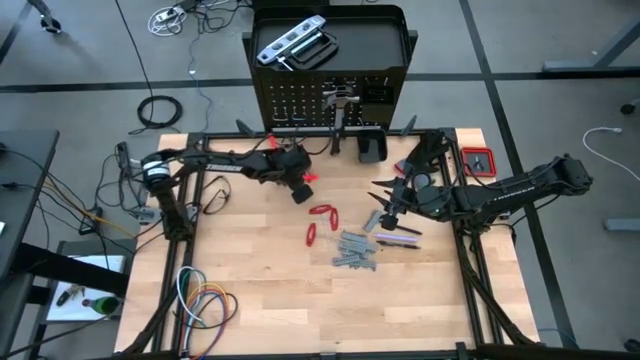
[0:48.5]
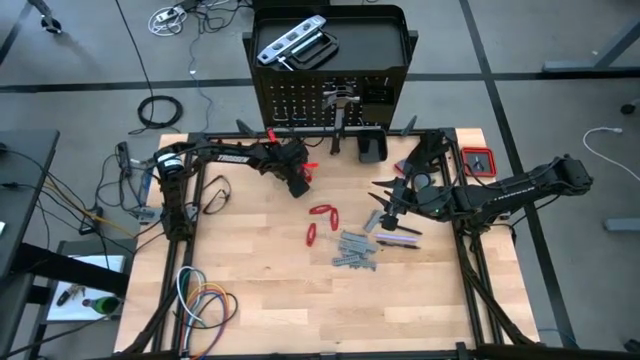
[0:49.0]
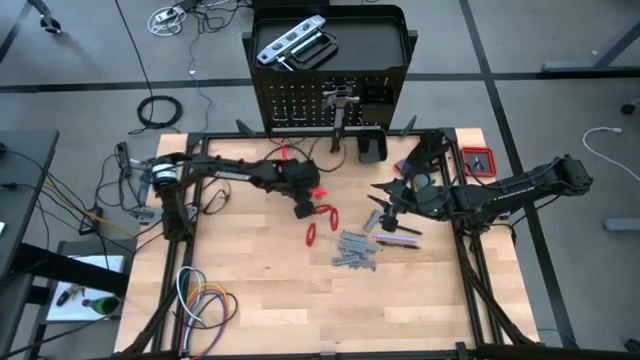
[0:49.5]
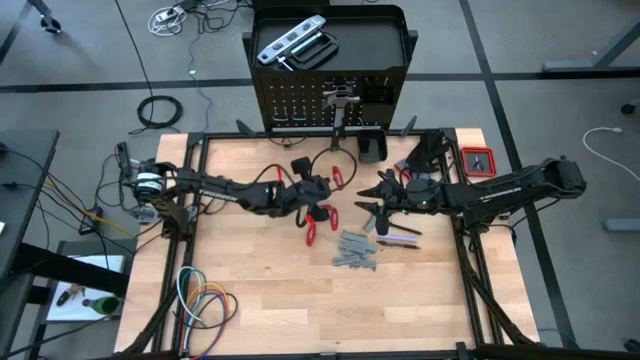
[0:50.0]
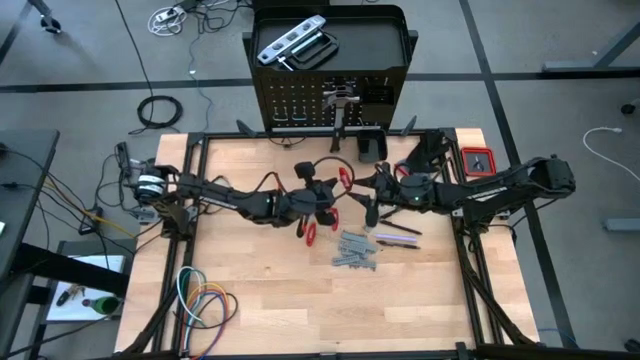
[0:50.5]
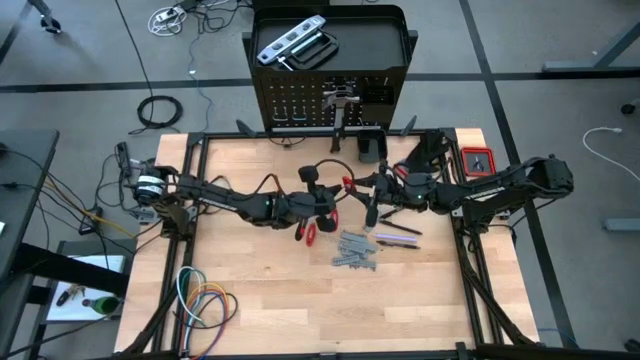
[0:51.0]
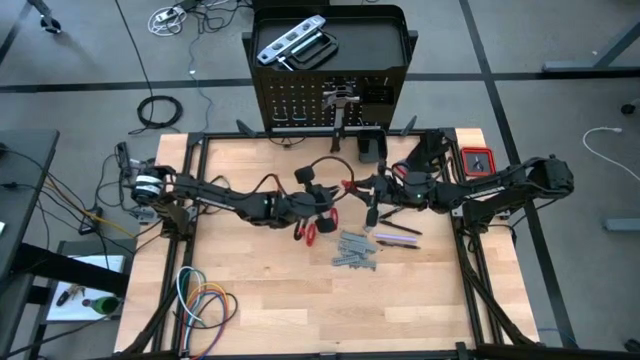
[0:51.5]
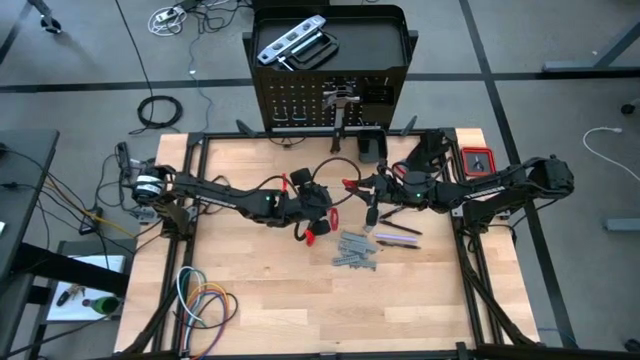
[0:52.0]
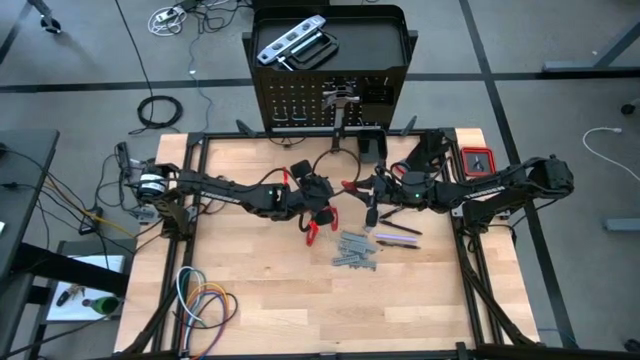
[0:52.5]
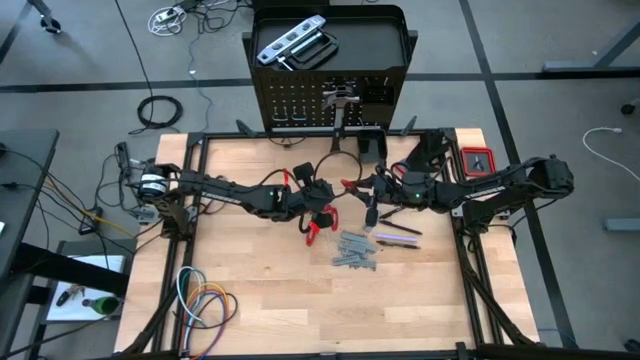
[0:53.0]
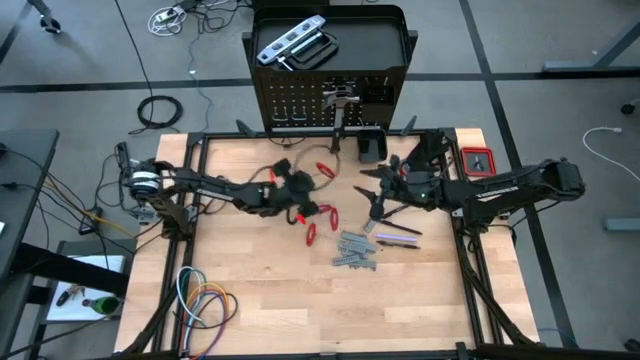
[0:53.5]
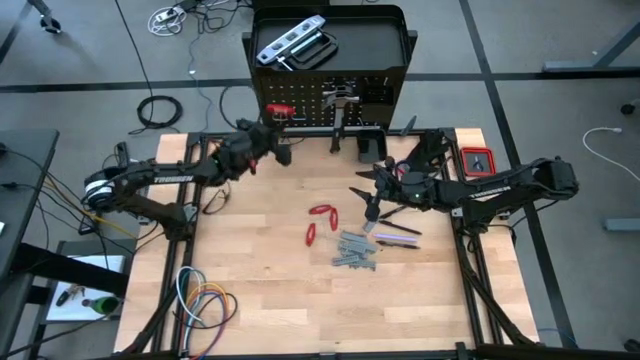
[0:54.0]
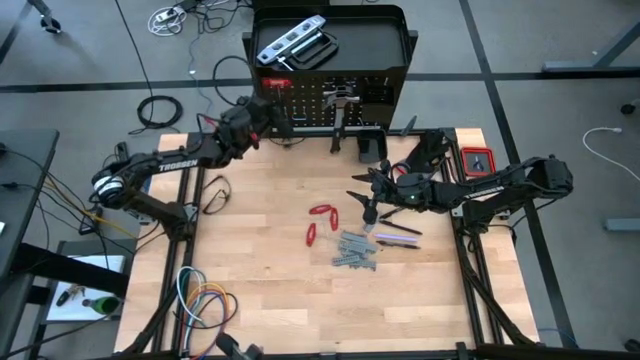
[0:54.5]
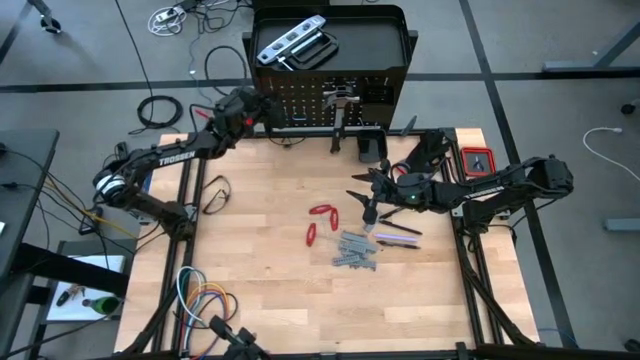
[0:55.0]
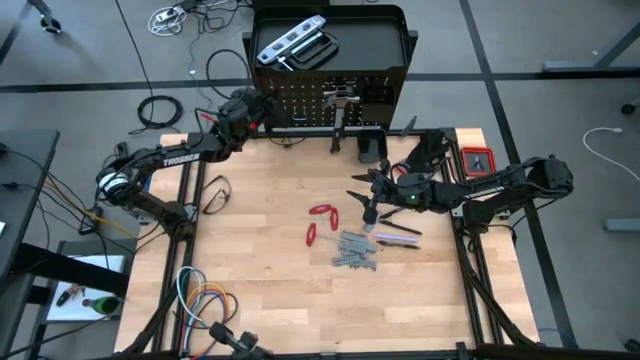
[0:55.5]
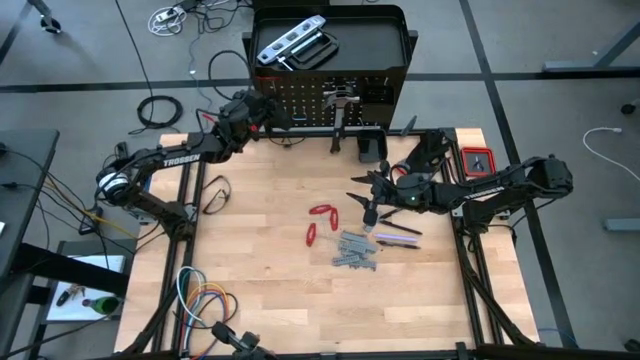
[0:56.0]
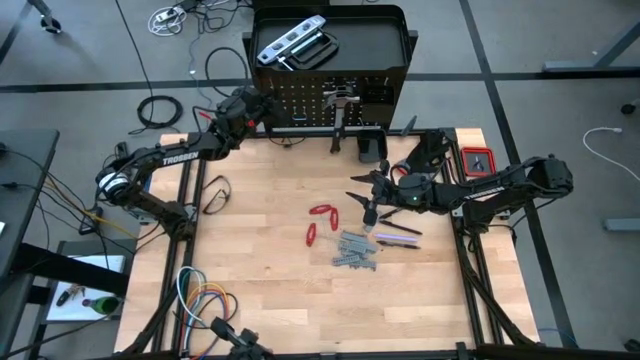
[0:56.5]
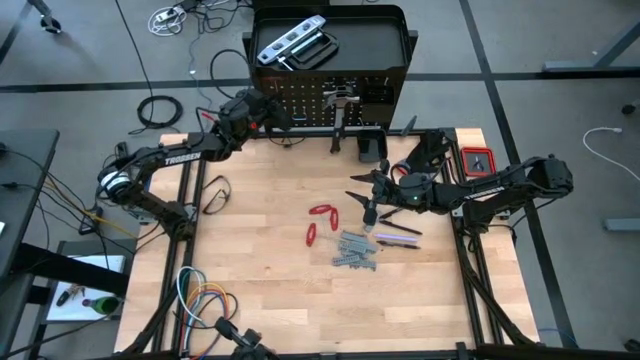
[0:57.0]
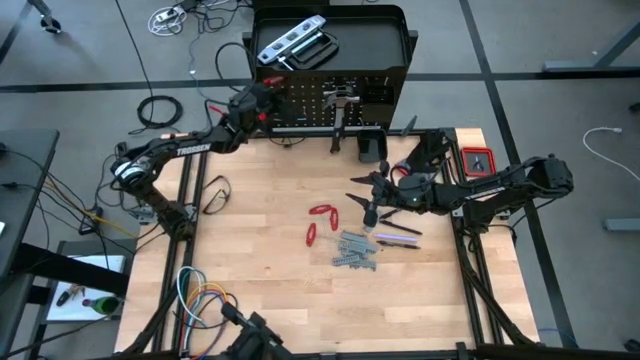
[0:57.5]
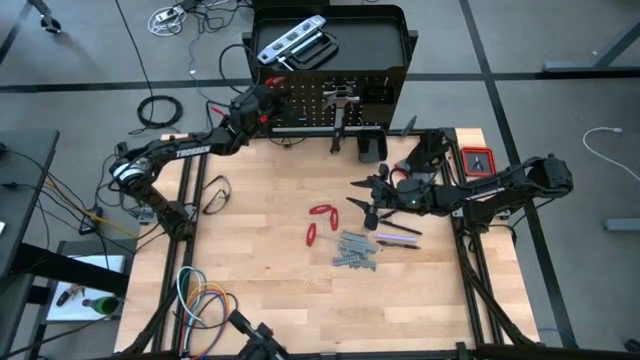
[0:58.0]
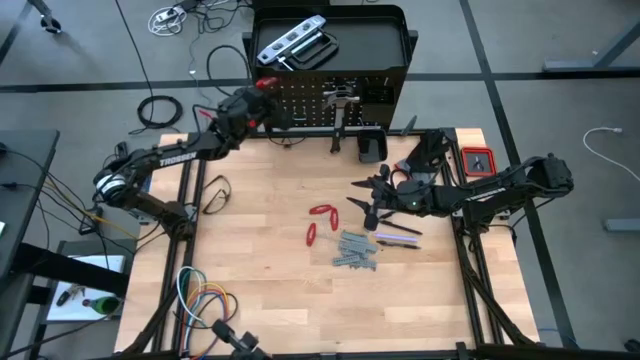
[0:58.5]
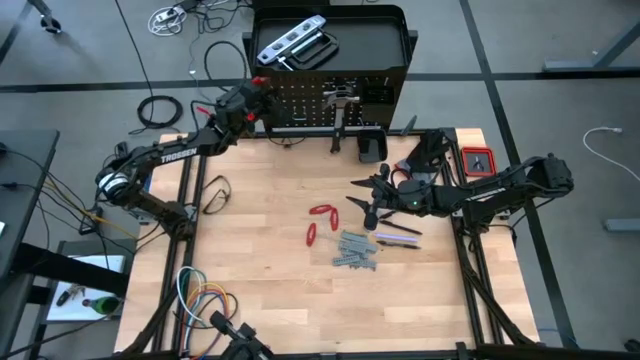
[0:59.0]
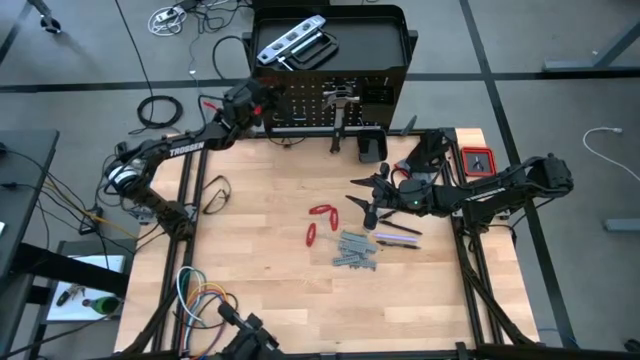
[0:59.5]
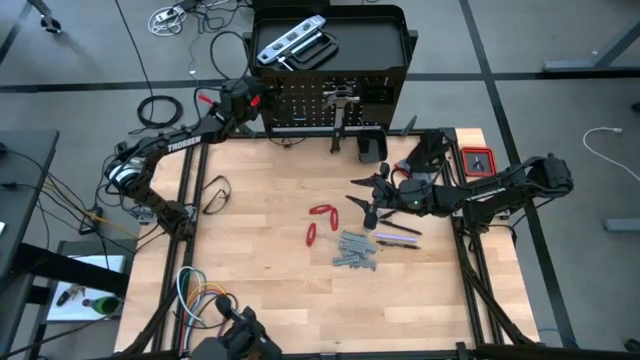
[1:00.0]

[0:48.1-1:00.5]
Task: Hang tools onto peg board
Hang the allen wrench onto the peg board

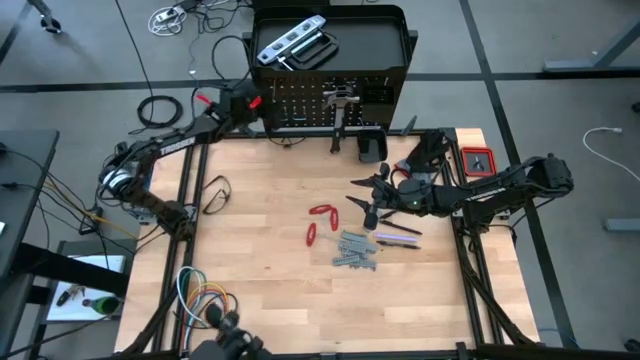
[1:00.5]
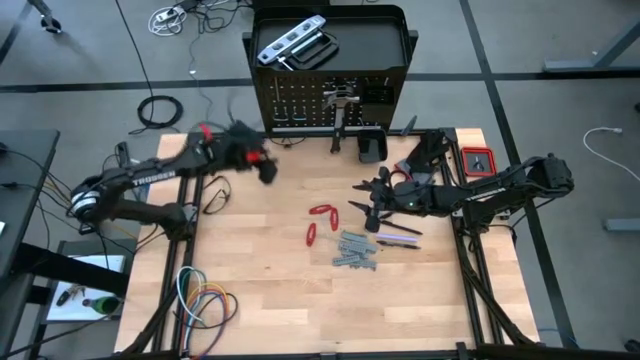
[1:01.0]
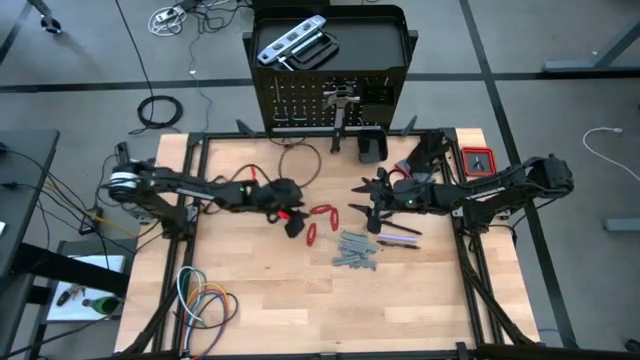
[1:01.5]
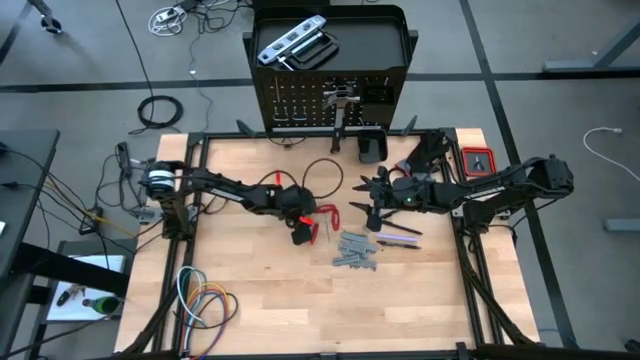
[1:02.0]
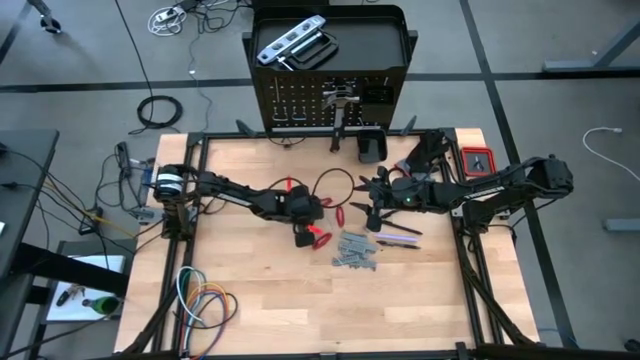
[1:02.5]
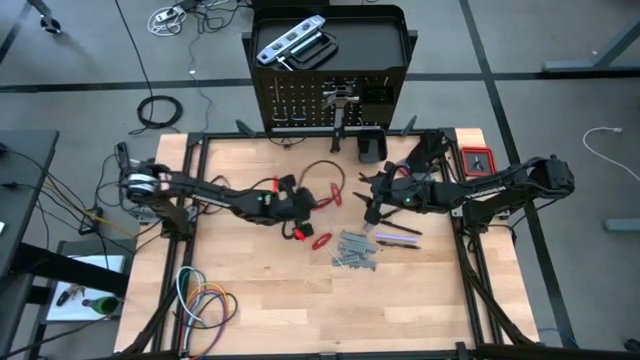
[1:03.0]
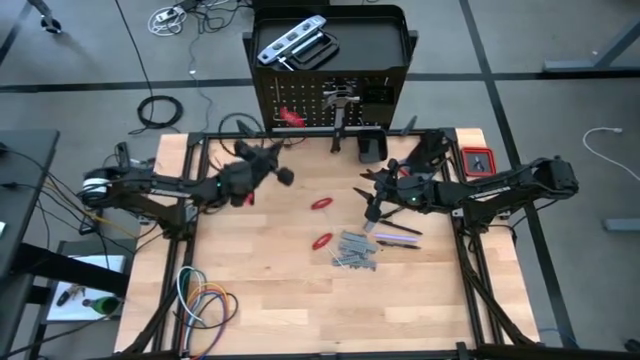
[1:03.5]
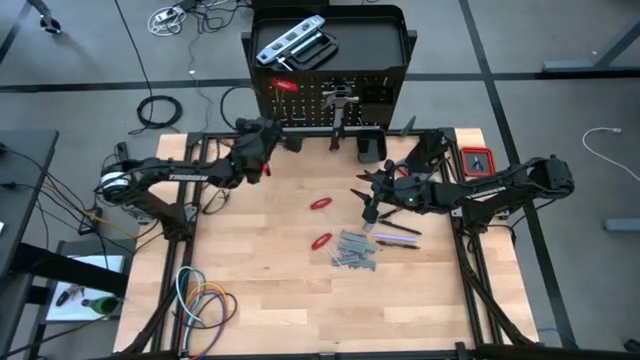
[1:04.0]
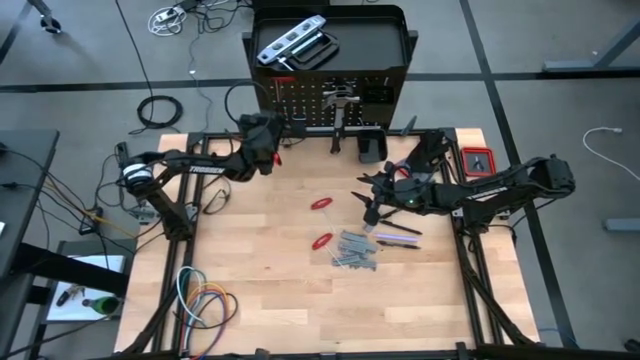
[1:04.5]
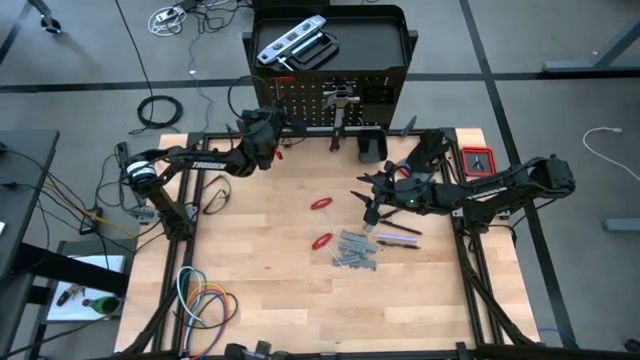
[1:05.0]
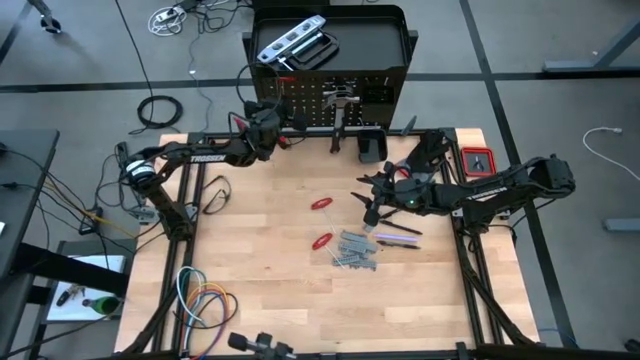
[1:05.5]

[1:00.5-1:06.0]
Hang the right allen wrench onto the peg board

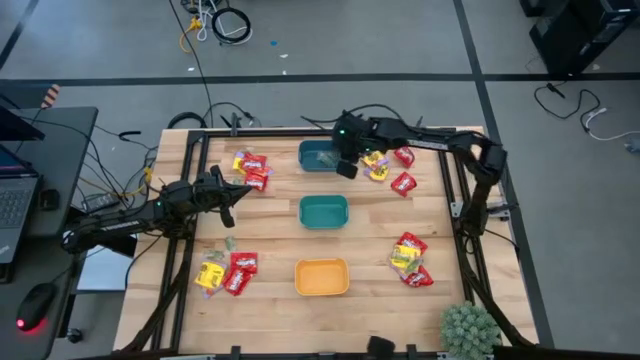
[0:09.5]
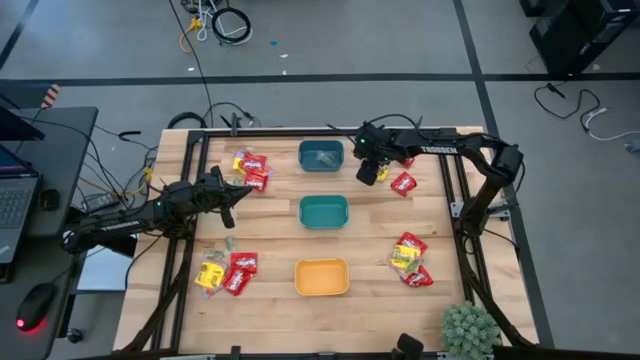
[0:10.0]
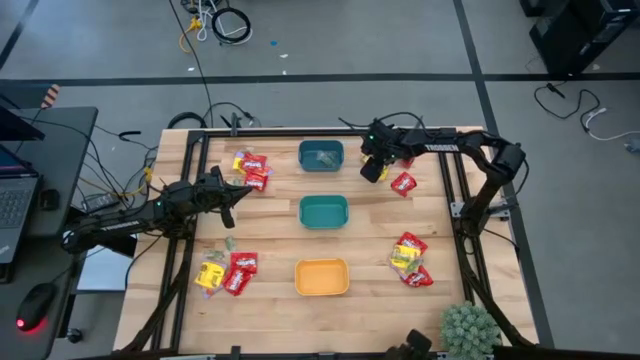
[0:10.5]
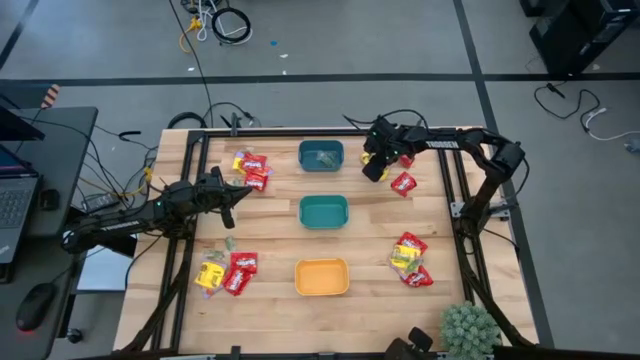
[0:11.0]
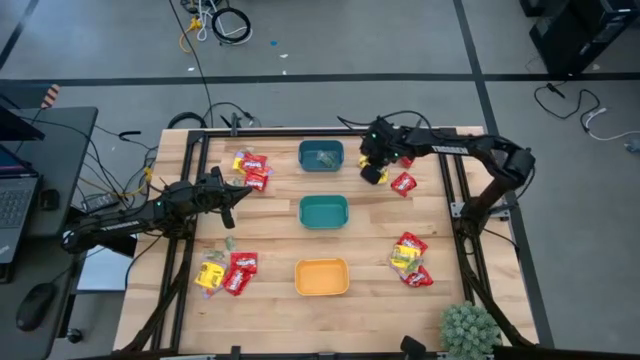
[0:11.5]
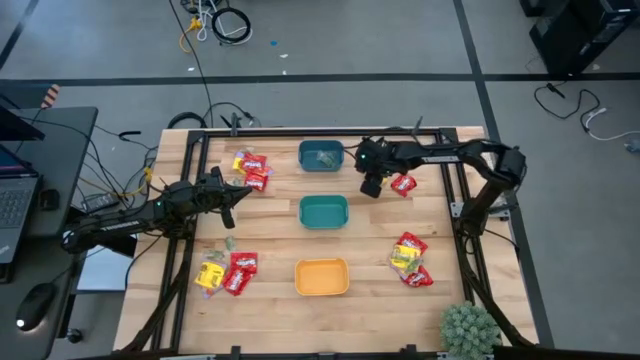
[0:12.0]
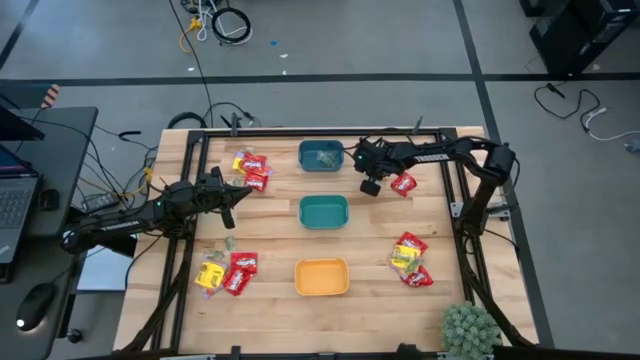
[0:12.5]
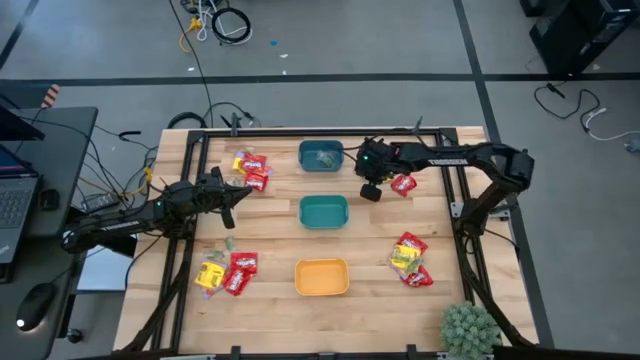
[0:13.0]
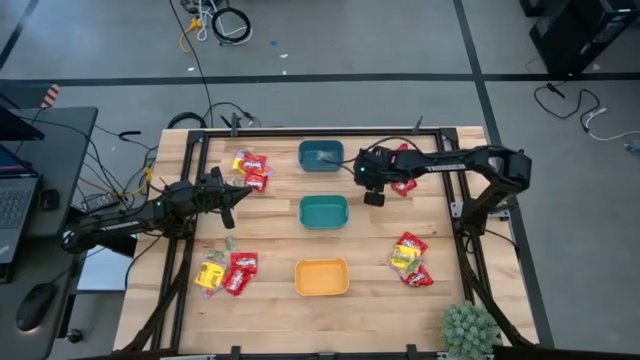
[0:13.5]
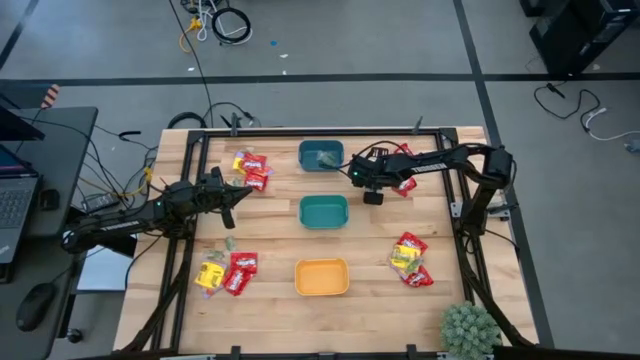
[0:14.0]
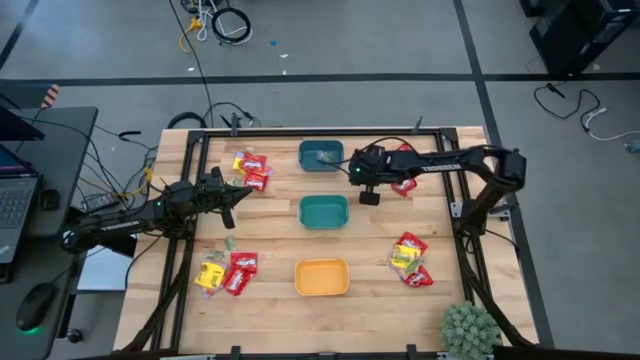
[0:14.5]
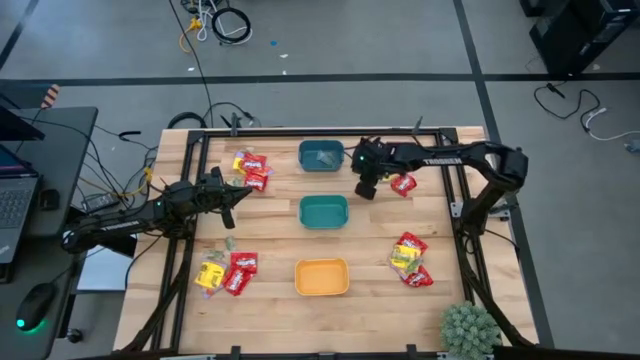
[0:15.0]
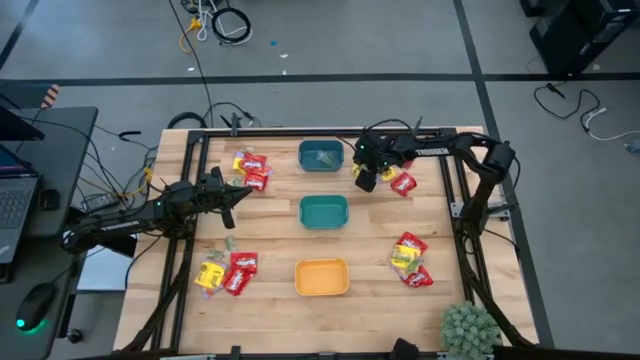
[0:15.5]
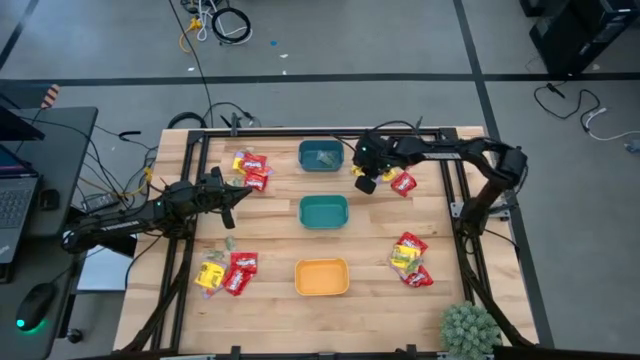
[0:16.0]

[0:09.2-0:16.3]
Task: Sort candy
Put the yellow candy into the yellow bin
